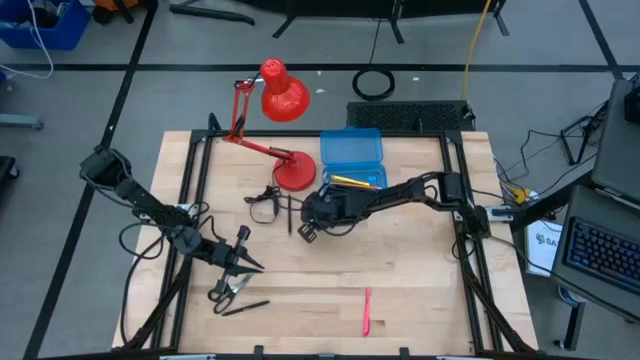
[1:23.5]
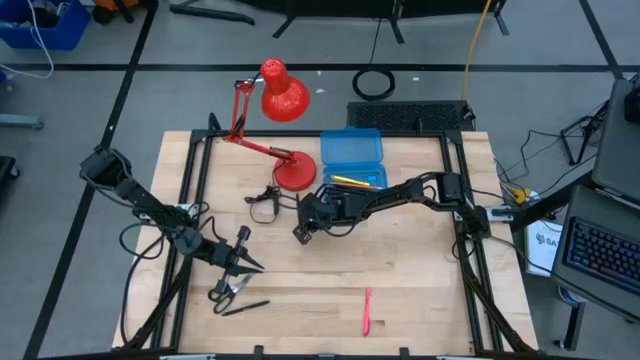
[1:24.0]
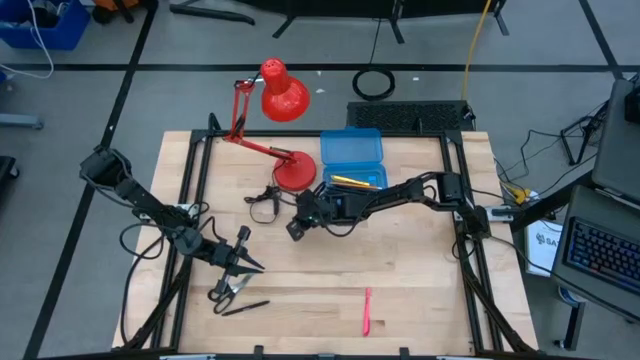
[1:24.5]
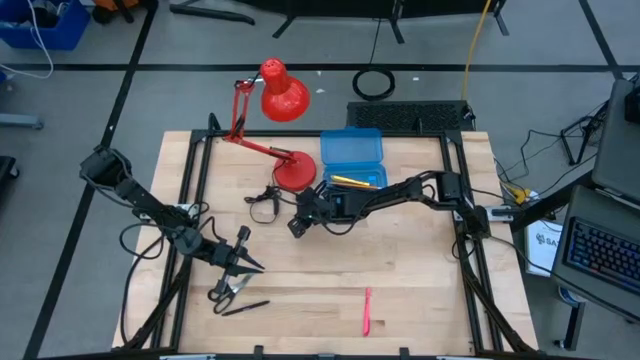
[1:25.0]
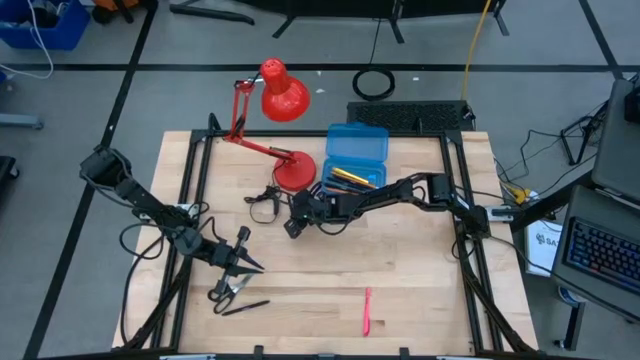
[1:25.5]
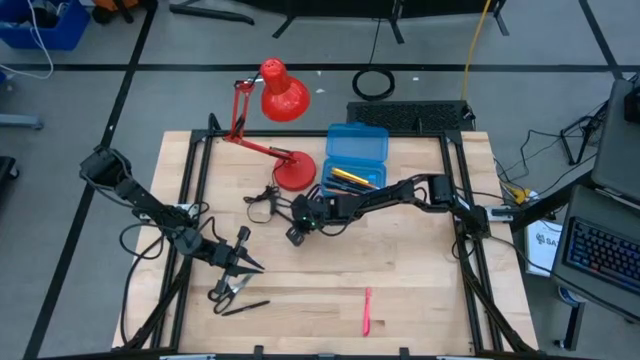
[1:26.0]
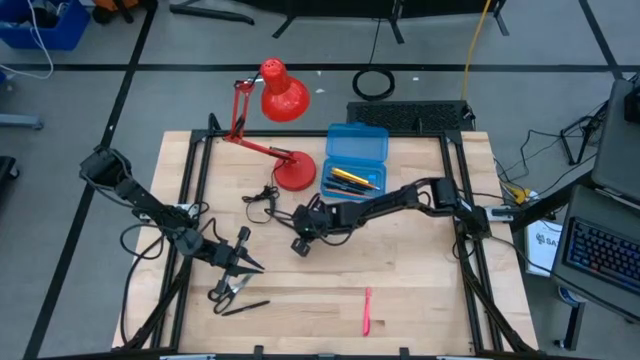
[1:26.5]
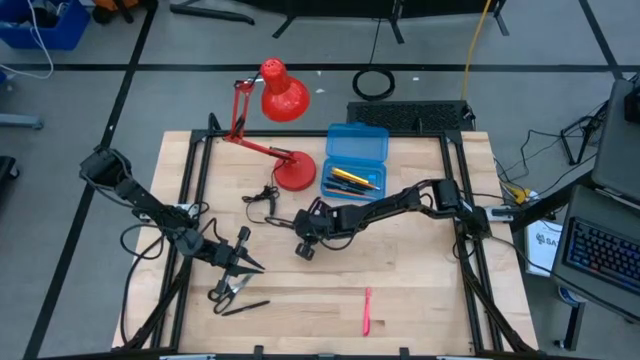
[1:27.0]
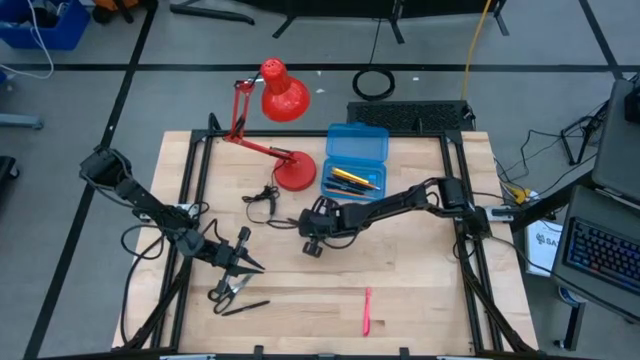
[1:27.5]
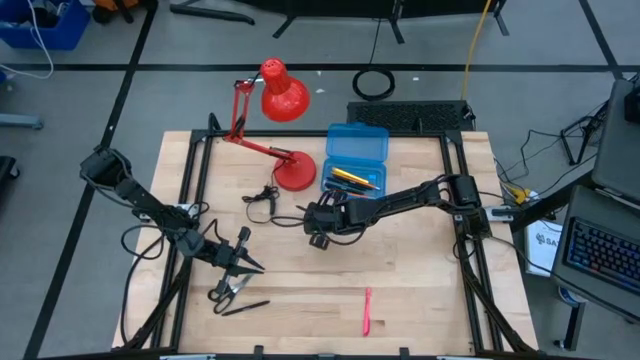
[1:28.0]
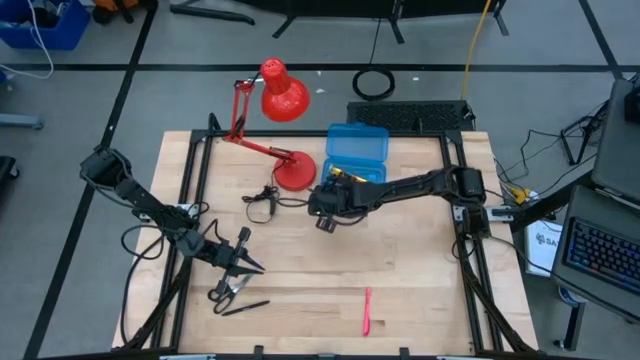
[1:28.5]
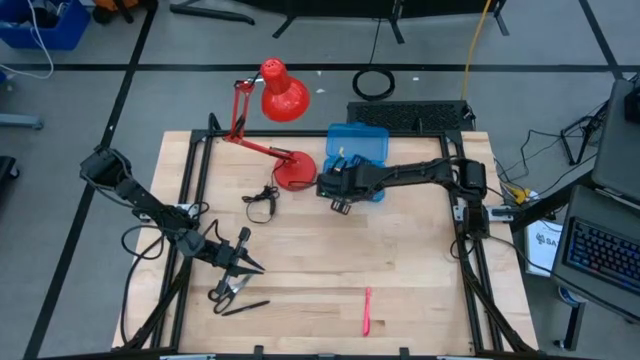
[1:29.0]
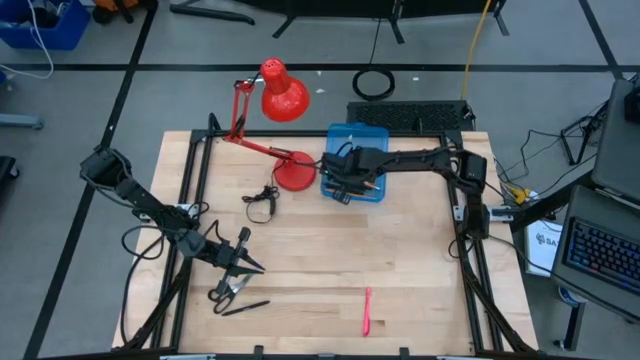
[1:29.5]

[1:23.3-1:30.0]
Task: Pick & place school supplies into a supply box
Put the black pen into the blue supply box

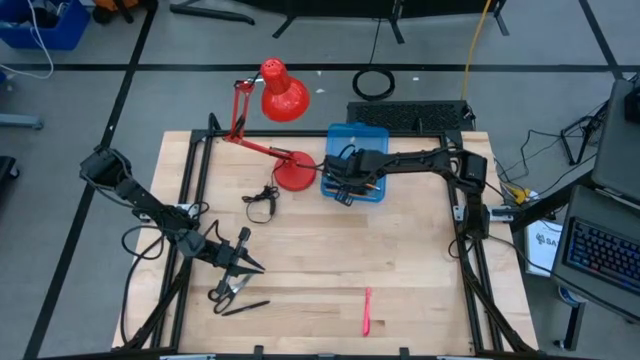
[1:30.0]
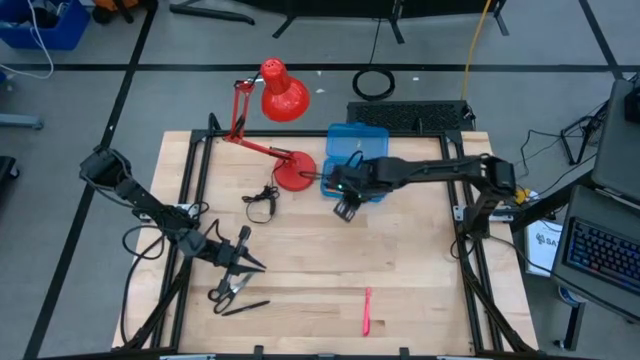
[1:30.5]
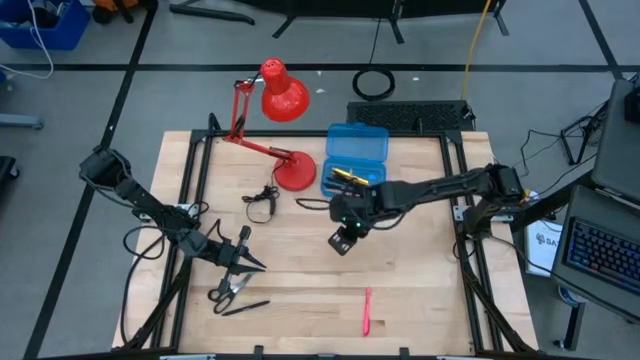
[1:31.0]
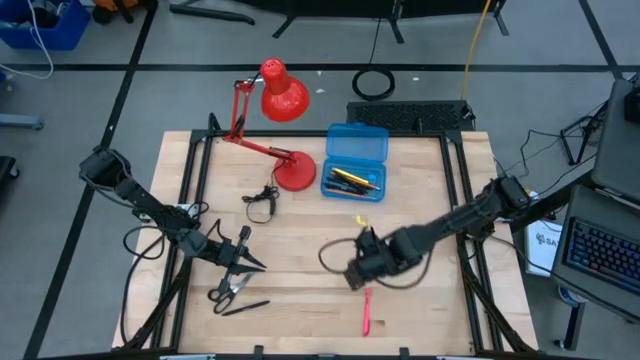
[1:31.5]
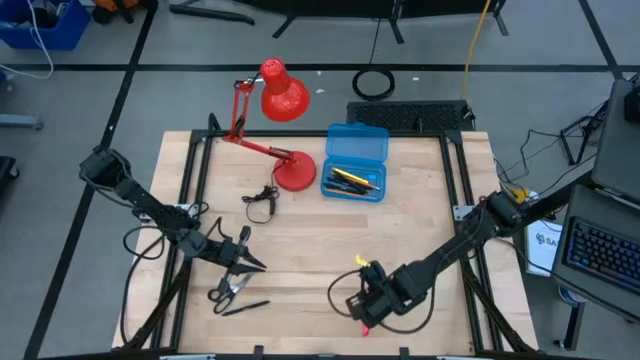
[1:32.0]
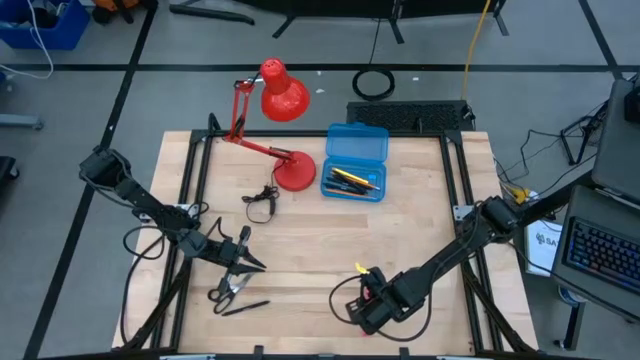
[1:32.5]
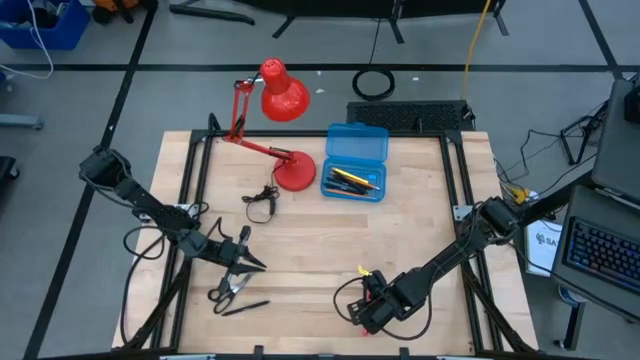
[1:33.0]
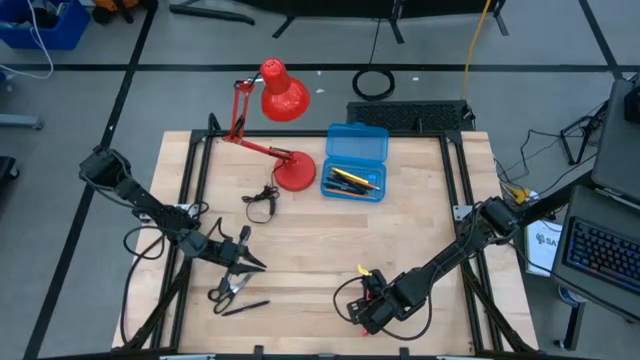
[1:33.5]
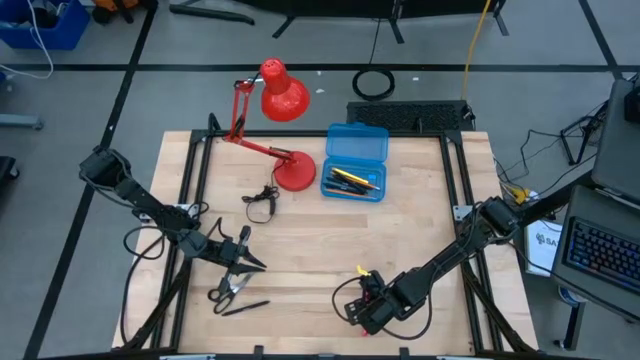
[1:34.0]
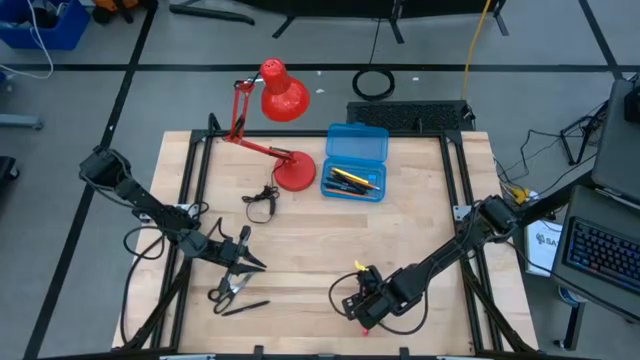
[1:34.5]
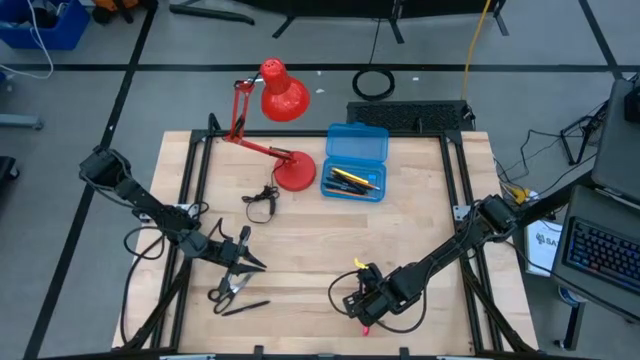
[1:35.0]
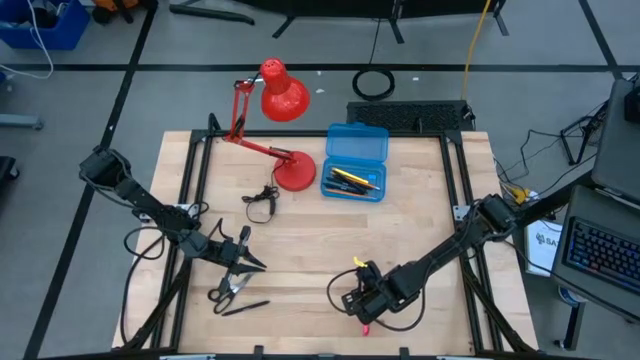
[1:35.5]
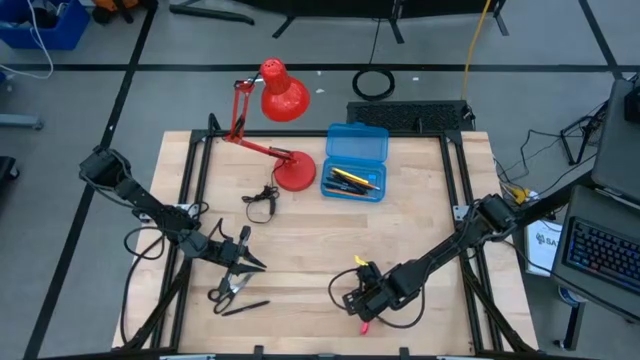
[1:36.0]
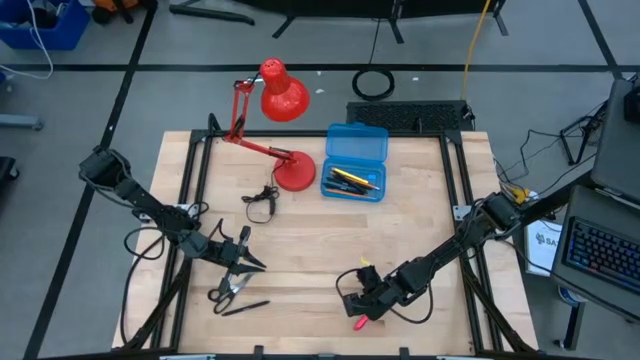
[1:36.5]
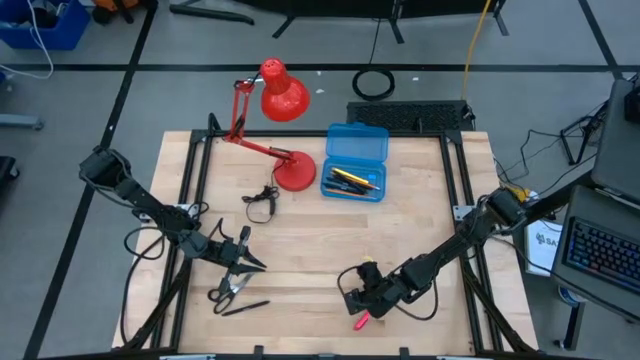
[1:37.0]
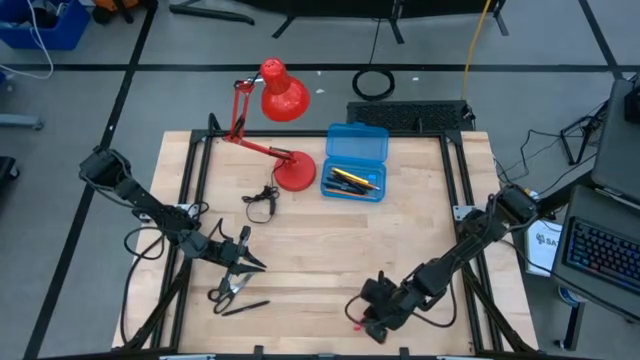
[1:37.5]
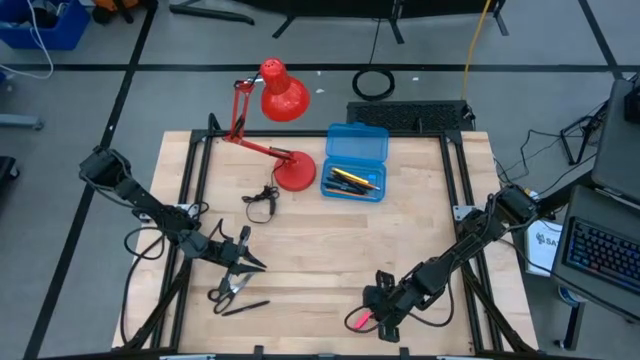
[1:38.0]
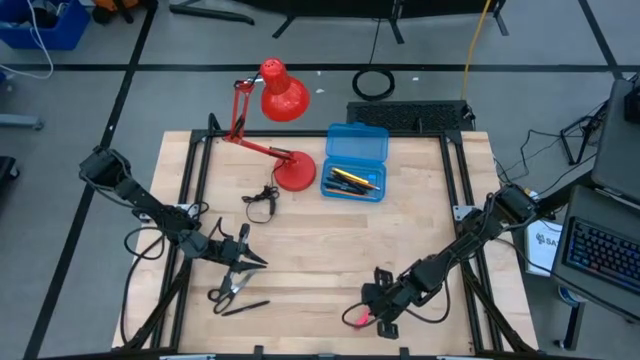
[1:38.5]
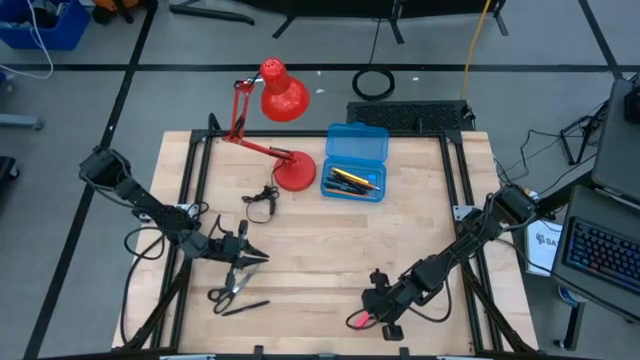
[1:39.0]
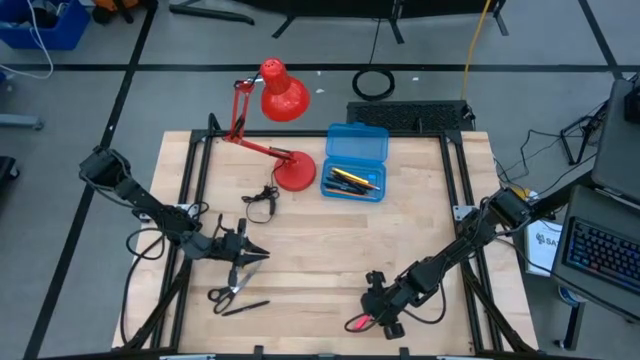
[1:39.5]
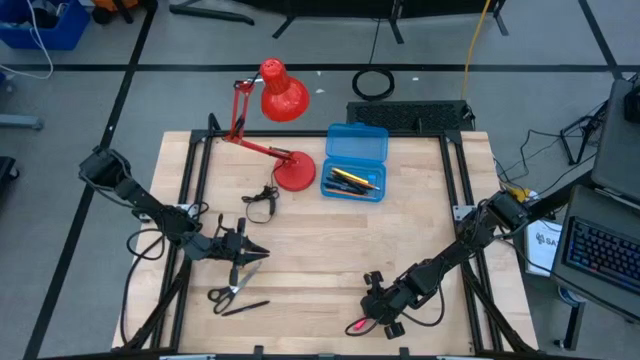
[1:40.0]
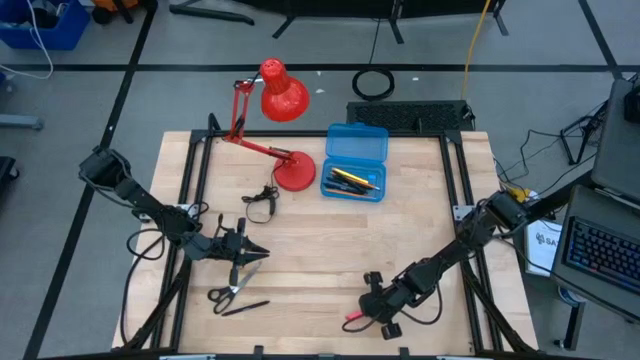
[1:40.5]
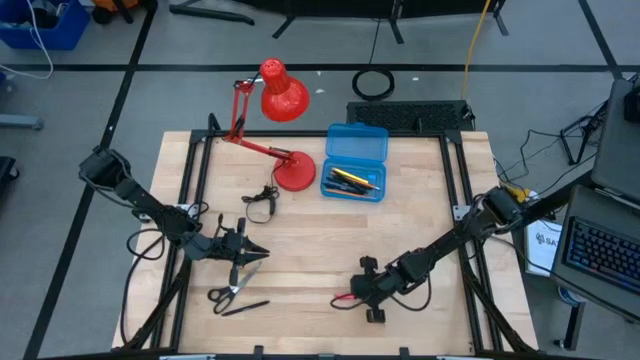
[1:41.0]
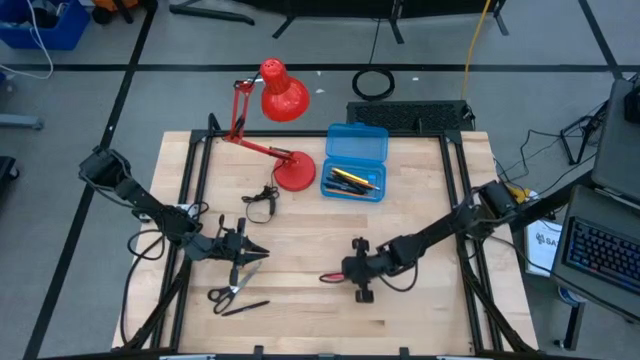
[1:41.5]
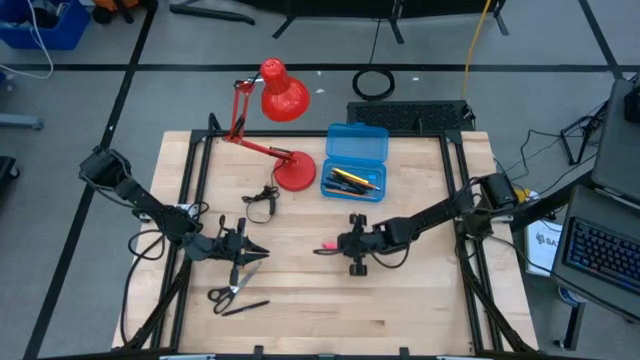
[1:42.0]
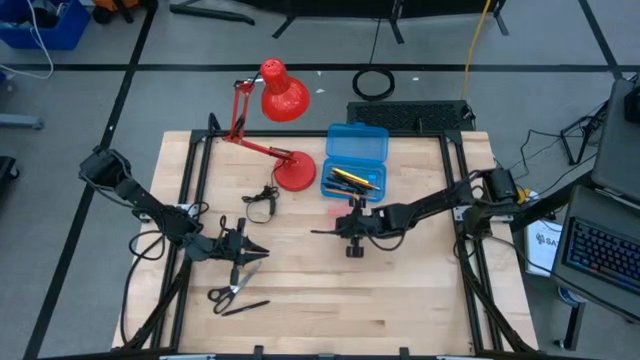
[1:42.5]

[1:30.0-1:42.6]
Put the pink pen into the blue supply box

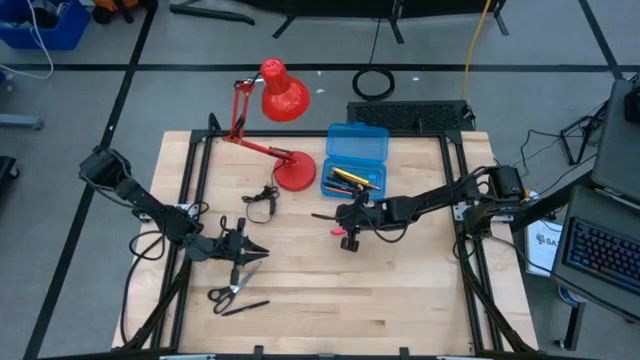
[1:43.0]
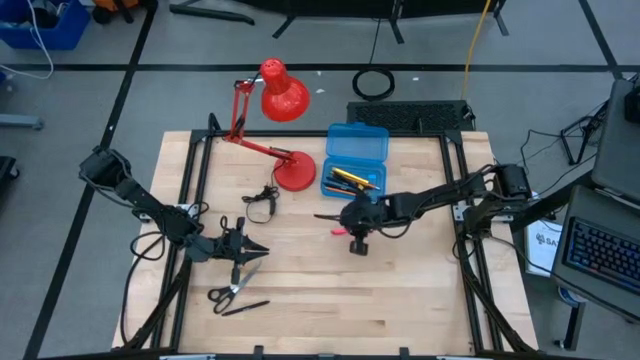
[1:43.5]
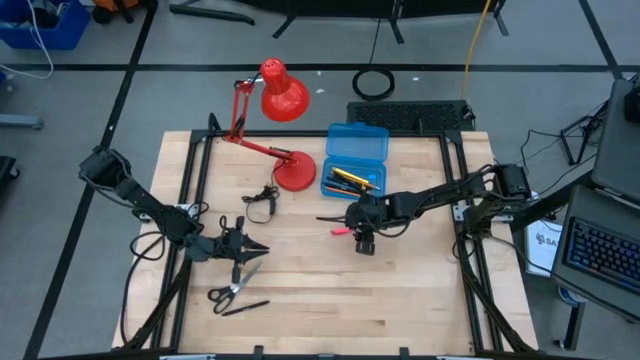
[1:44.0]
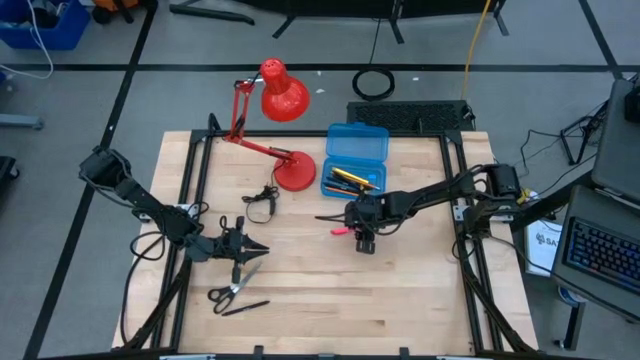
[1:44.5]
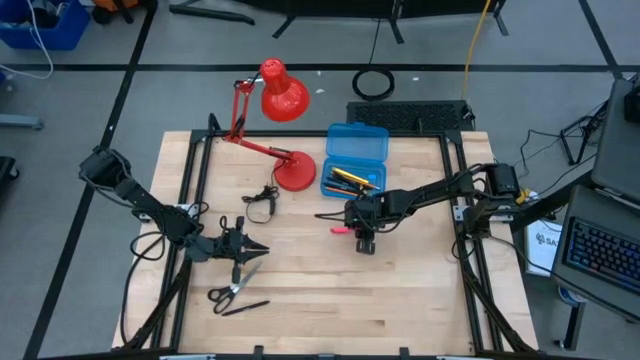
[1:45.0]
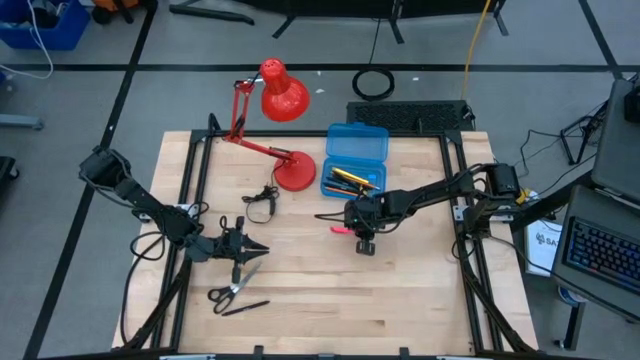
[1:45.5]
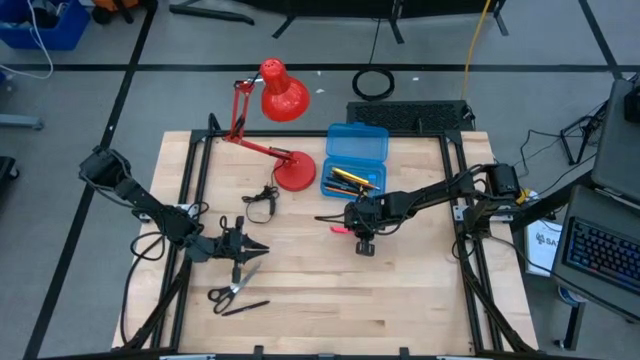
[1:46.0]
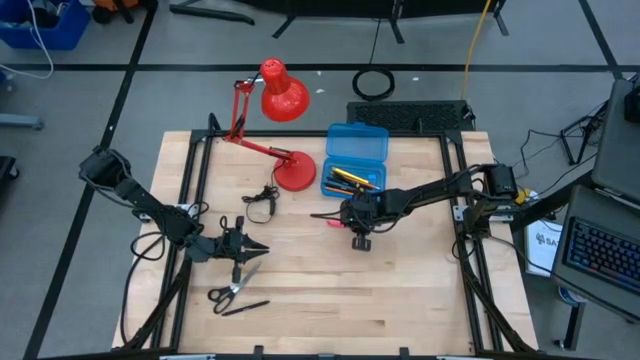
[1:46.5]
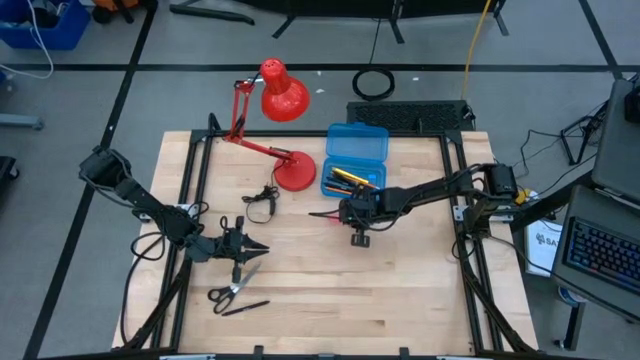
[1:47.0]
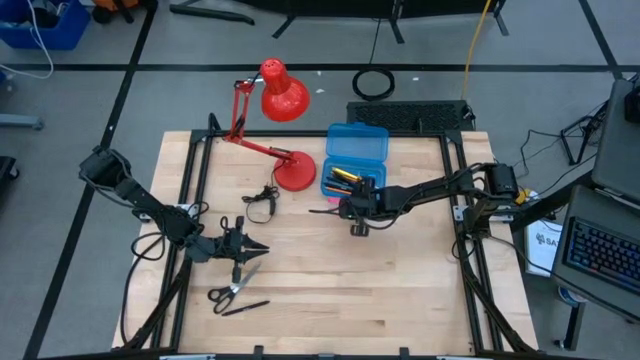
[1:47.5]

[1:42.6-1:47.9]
Put the pink pen into the blue supply box
